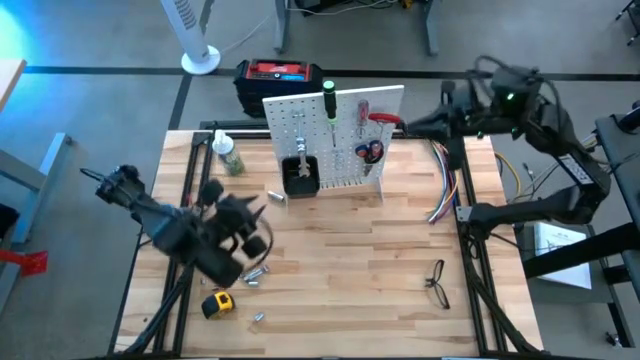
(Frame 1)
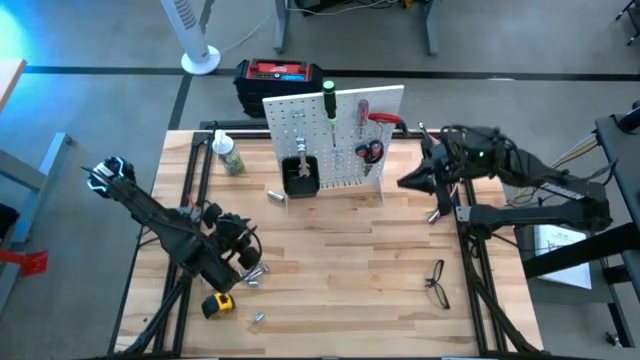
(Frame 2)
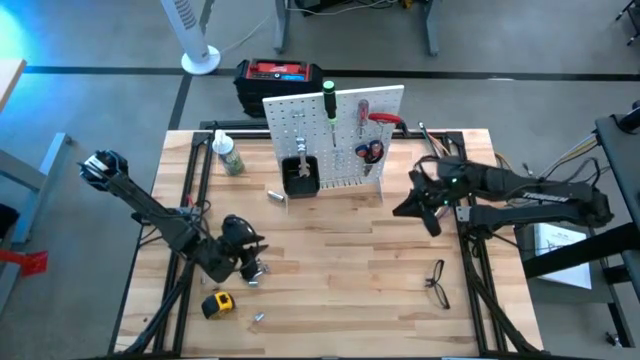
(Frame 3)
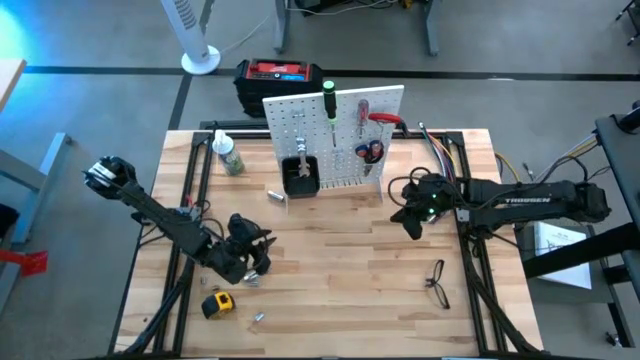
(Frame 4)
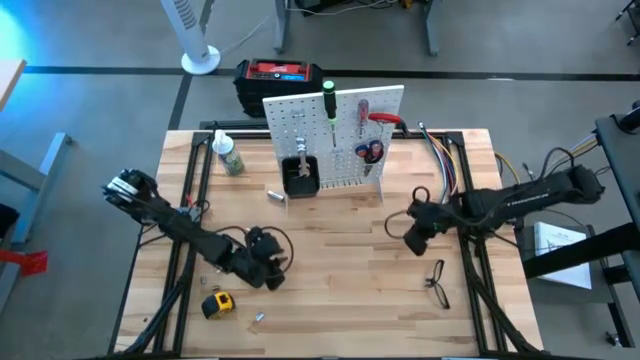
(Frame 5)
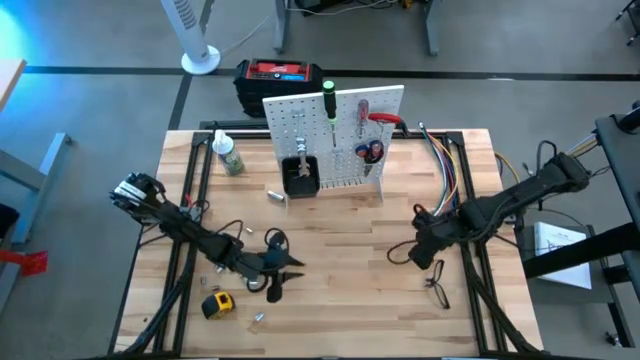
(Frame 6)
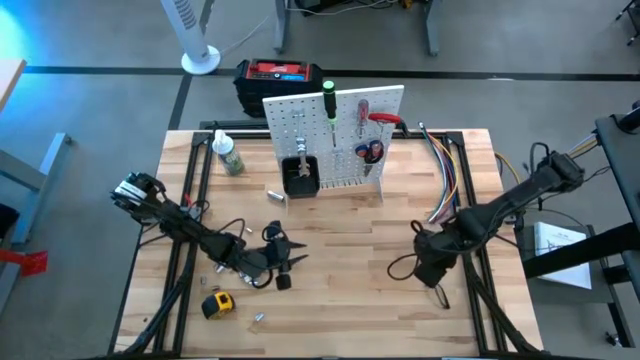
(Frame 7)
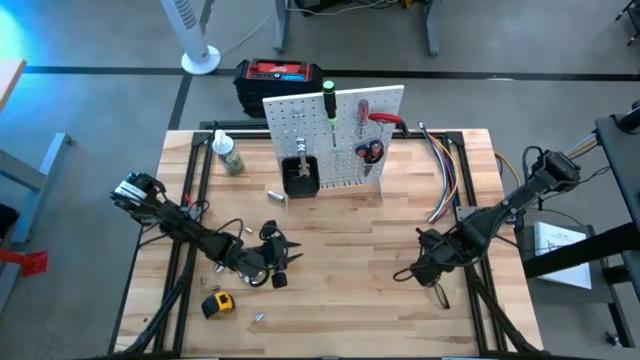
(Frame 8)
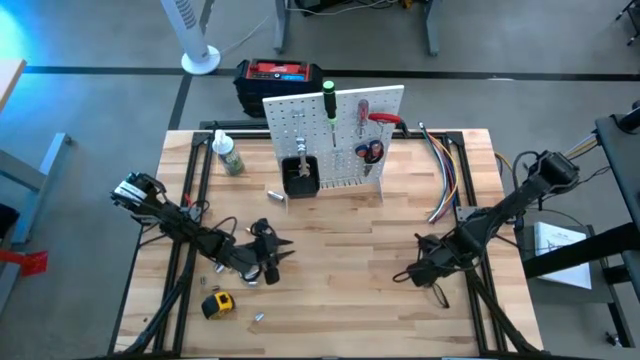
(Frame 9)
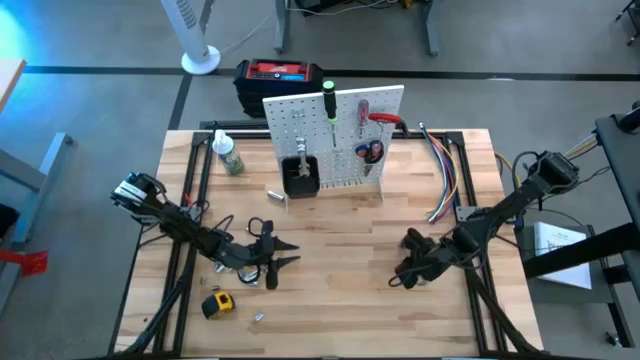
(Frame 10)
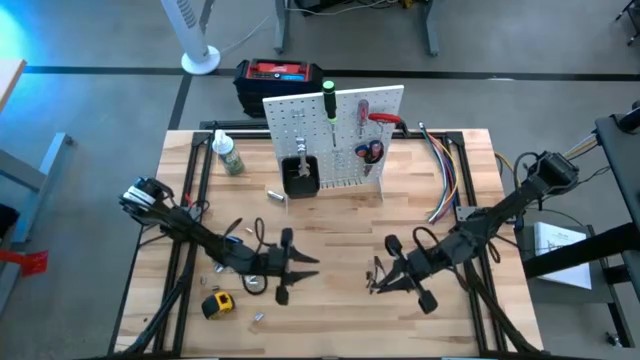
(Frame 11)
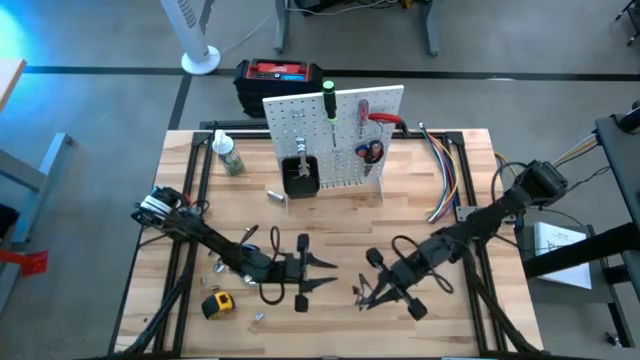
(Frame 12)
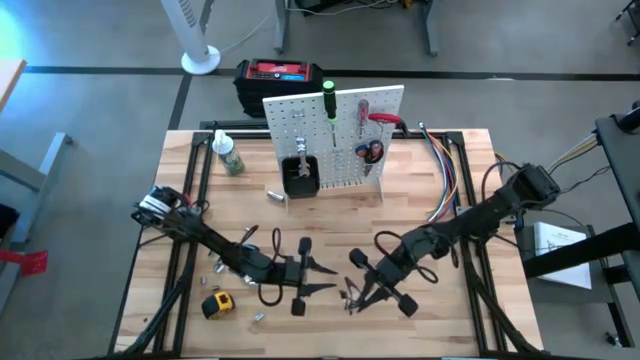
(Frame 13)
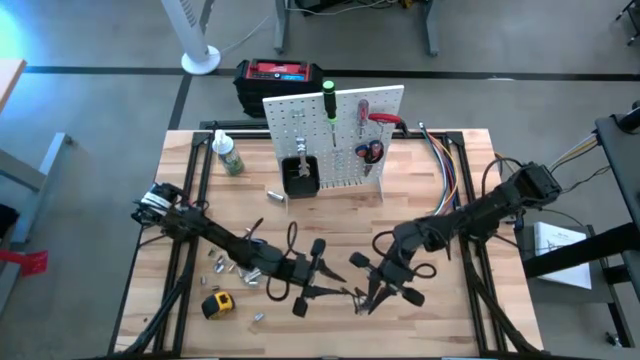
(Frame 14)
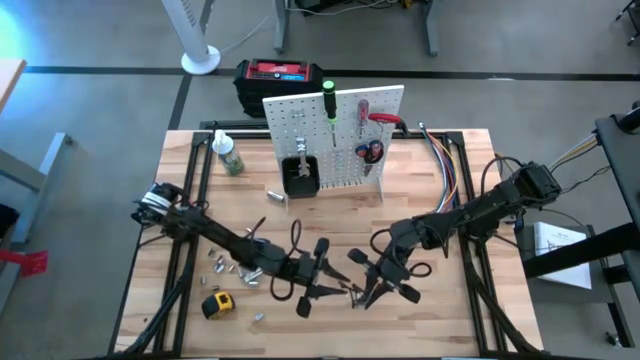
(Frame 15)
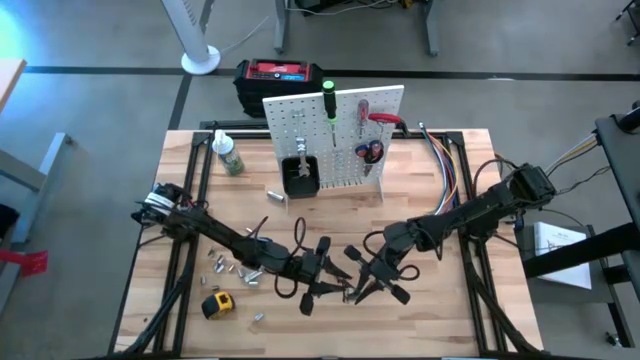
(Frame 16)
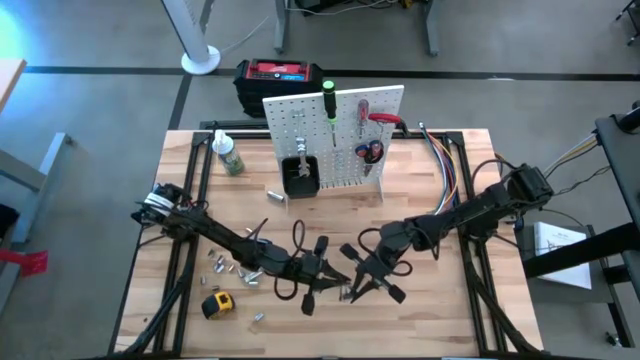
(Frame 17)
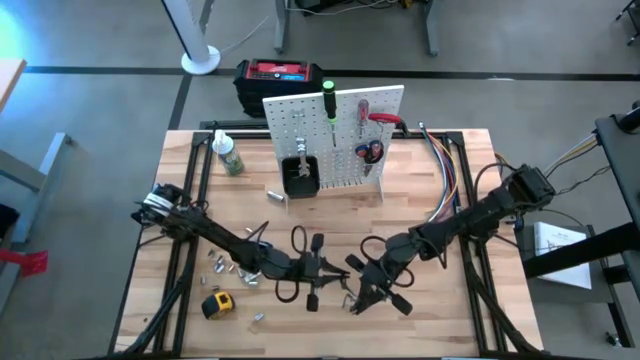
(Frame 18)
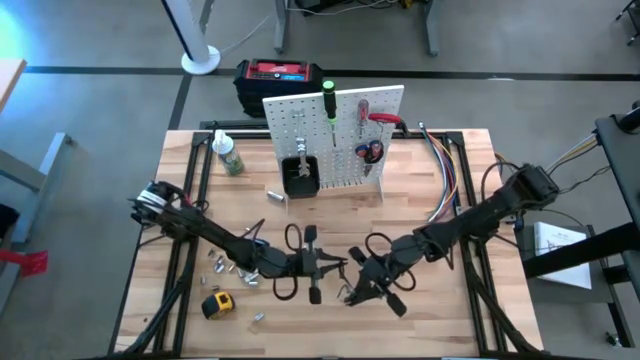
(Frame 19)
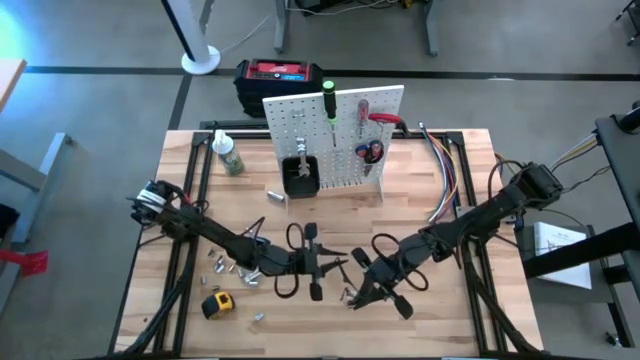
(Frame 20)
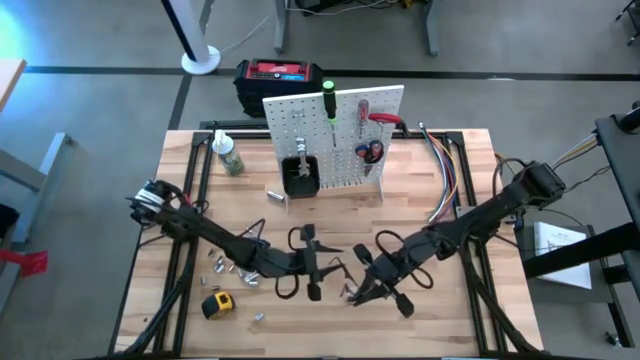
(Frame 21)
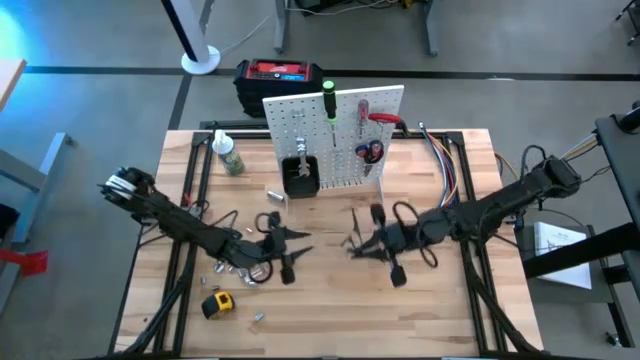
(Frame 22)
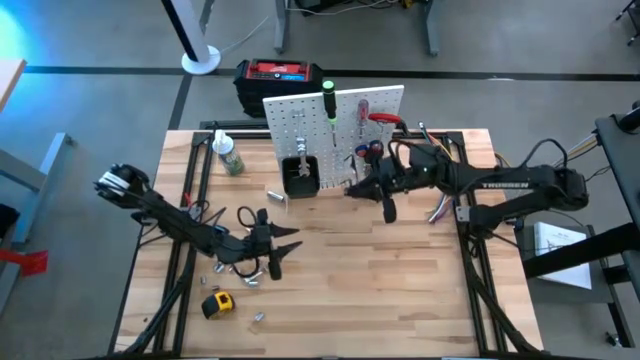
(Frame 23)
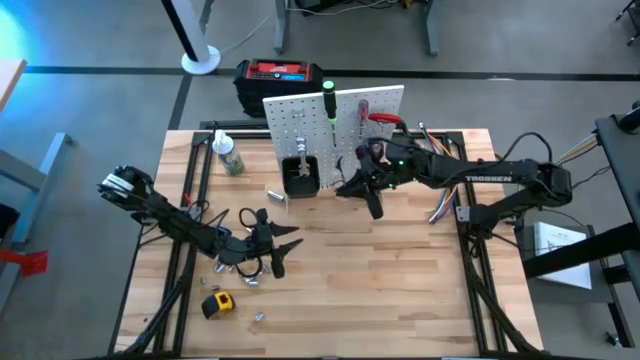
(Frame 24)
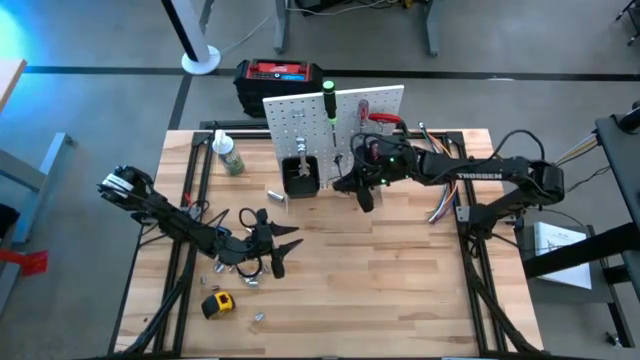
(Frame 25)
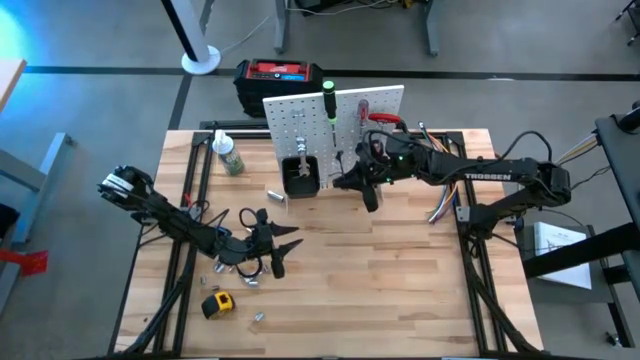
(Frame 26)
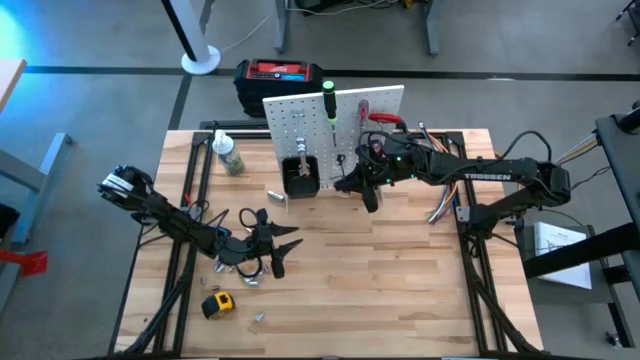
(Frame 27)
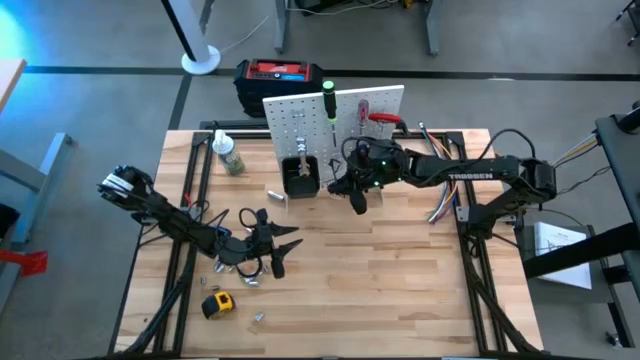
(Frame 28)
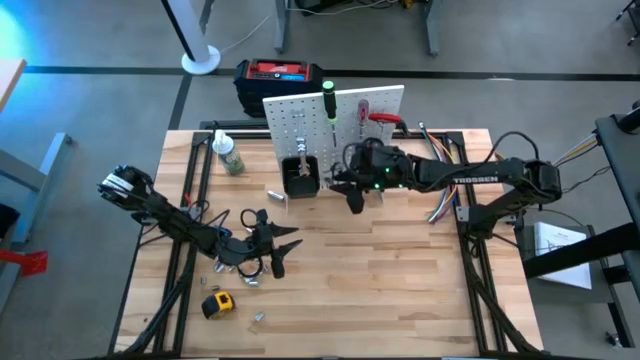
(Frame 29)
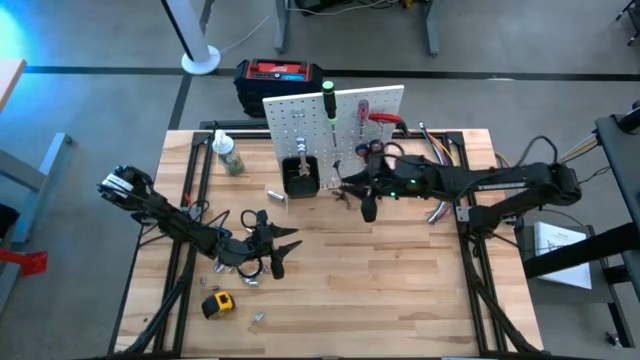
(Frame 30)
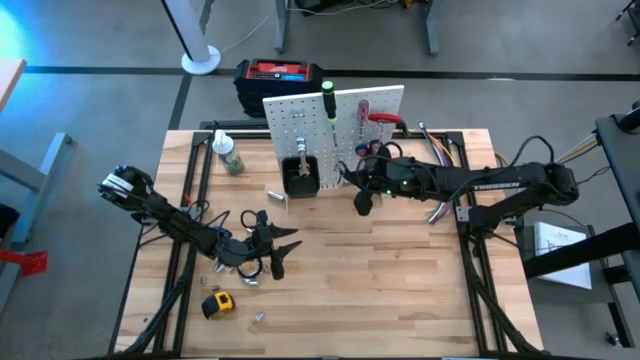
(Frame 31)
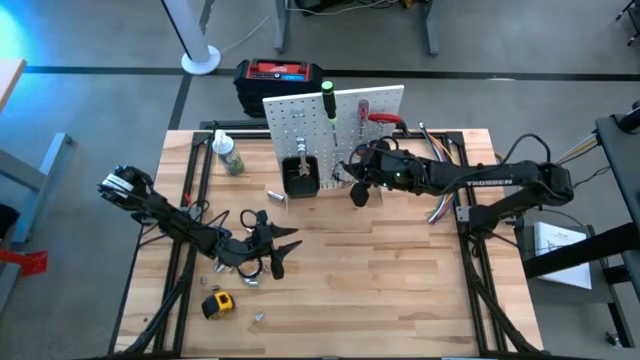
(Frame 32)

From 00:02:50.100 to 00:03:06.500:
Task: Hang tools onto peg board
Hang the safety glasses on the pegboard

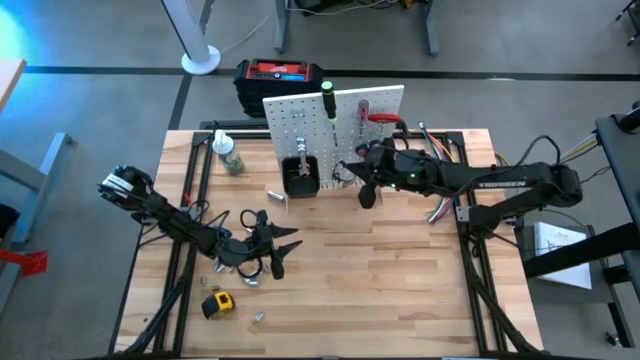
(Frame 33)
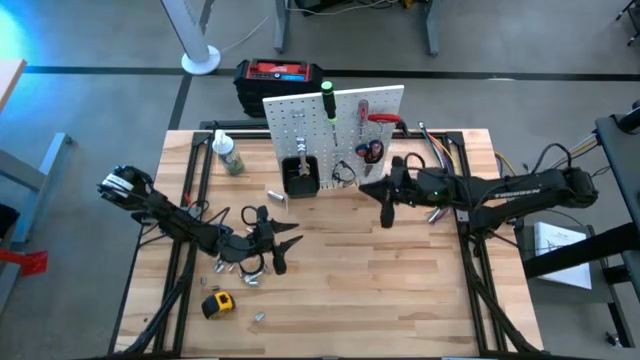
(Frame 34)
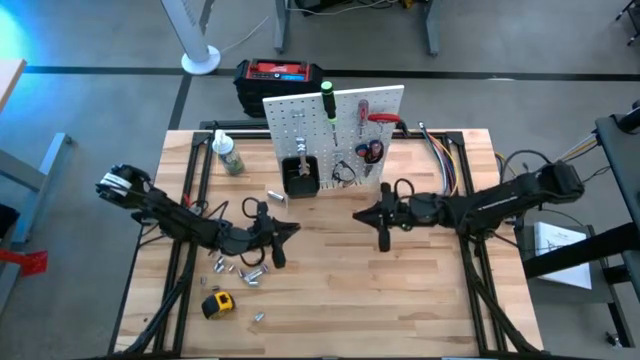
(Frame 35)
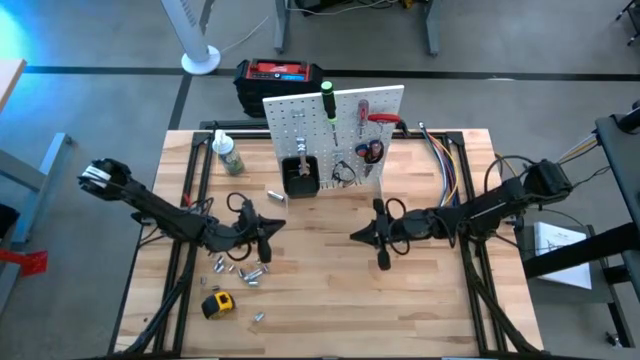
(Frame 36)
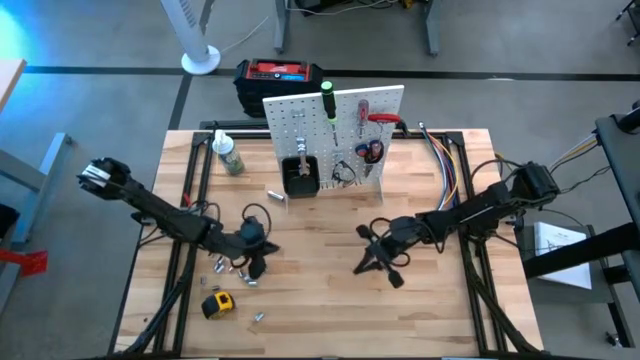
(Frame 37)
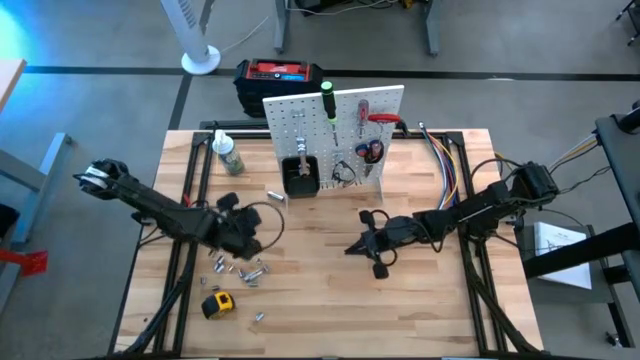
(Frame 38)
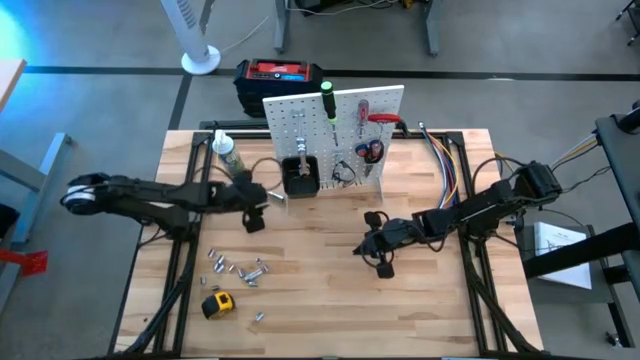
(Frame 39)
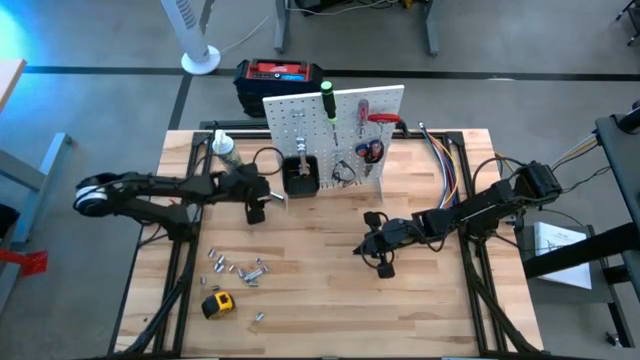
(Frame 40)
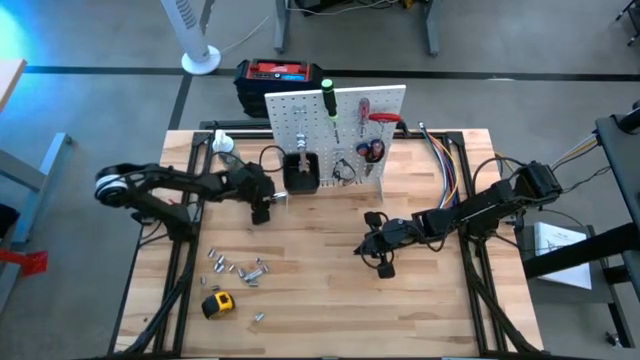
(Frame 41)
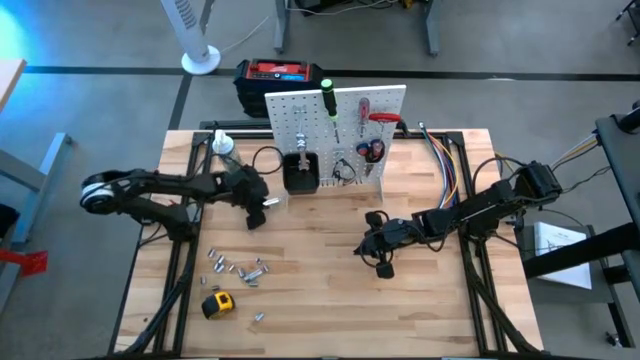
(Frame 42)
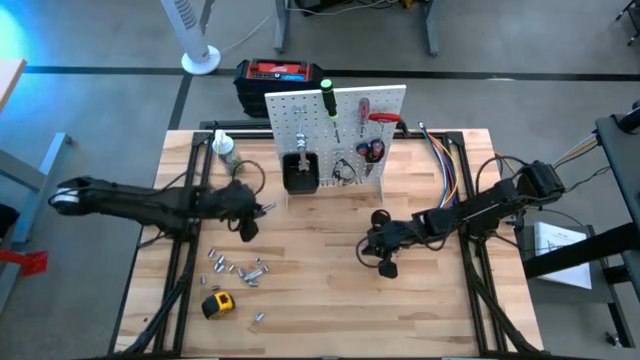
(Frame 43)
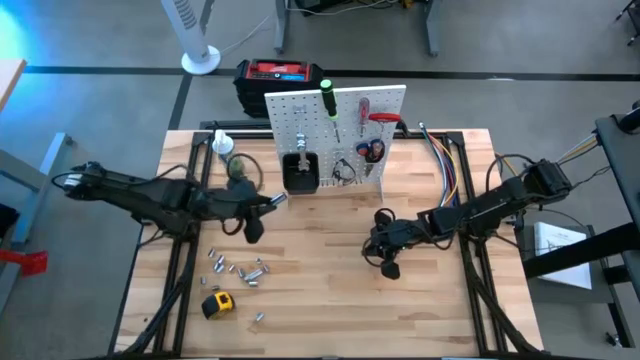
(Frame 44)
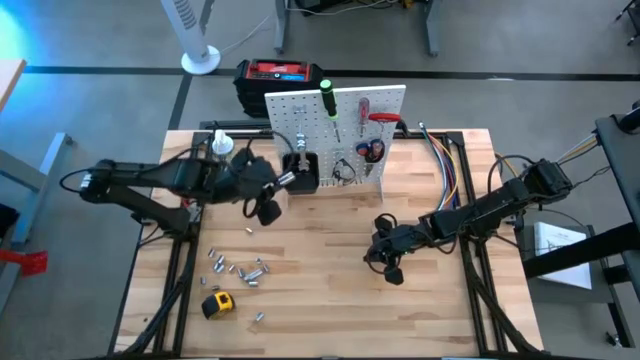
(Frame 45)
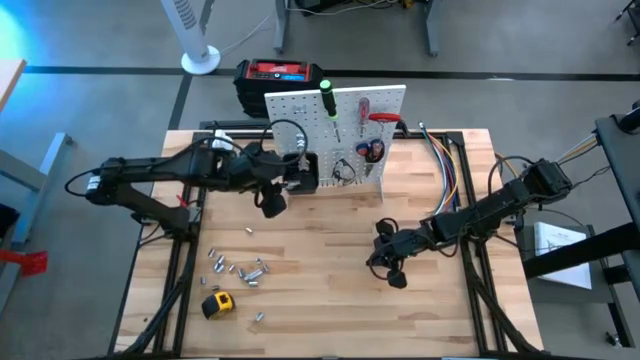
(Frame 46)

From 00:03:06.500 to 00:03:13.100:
Put the silver socket into the black bin on the pegboard
